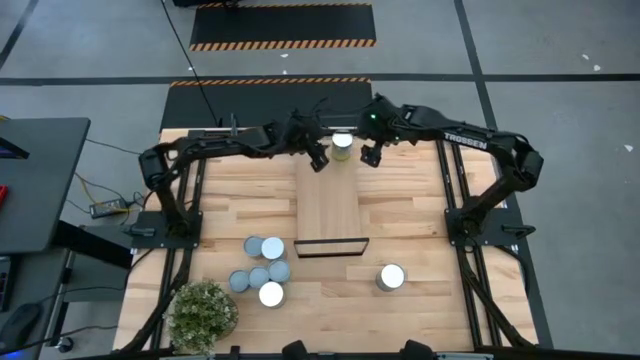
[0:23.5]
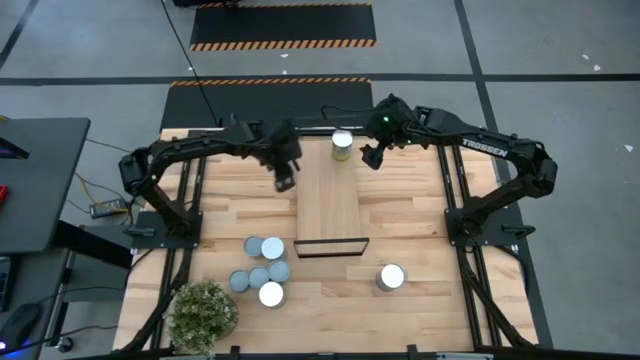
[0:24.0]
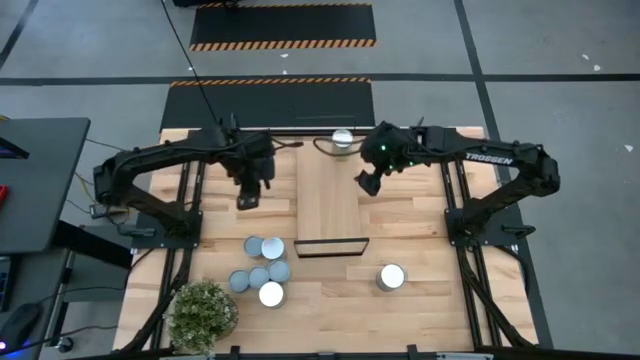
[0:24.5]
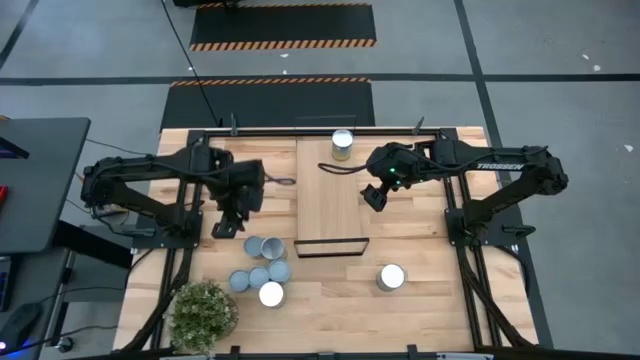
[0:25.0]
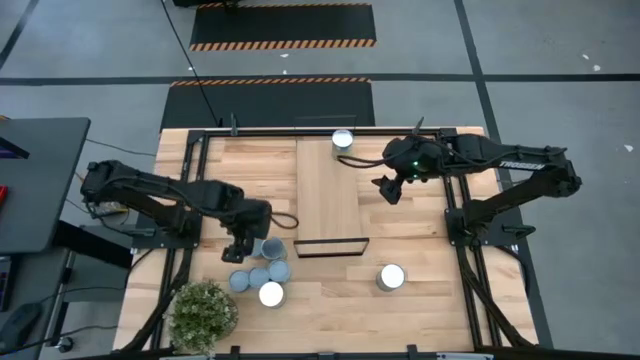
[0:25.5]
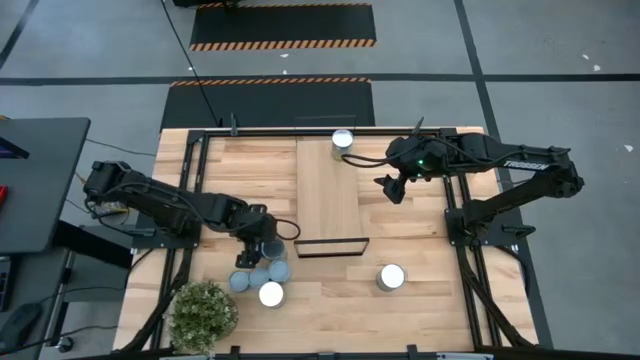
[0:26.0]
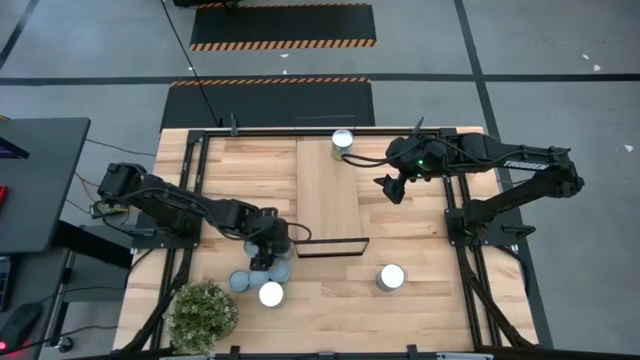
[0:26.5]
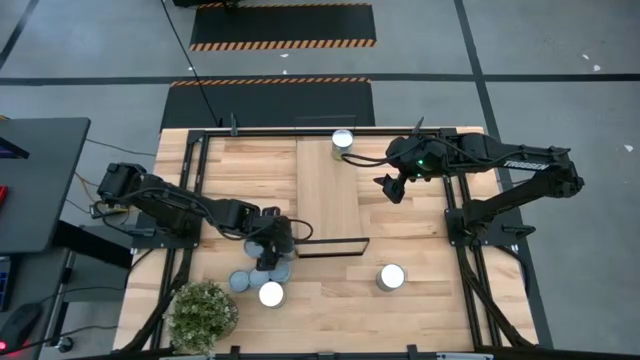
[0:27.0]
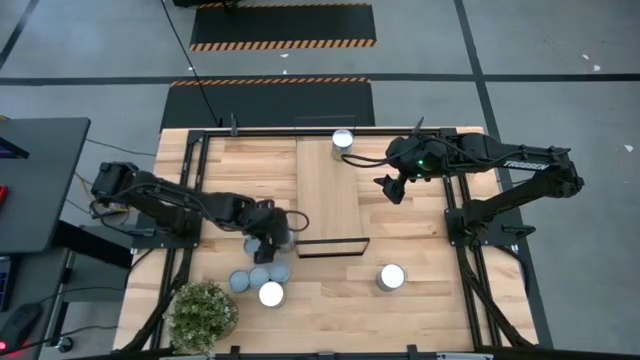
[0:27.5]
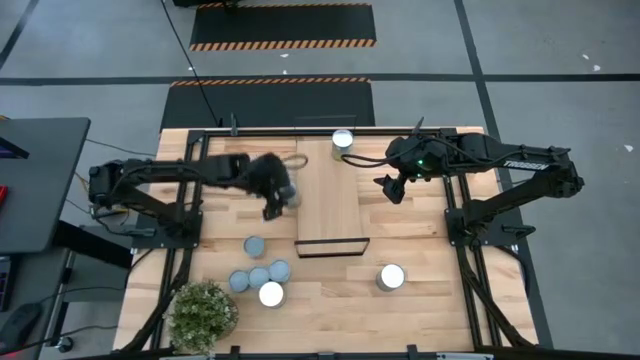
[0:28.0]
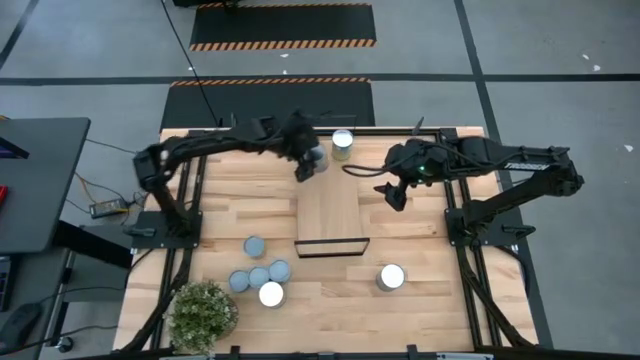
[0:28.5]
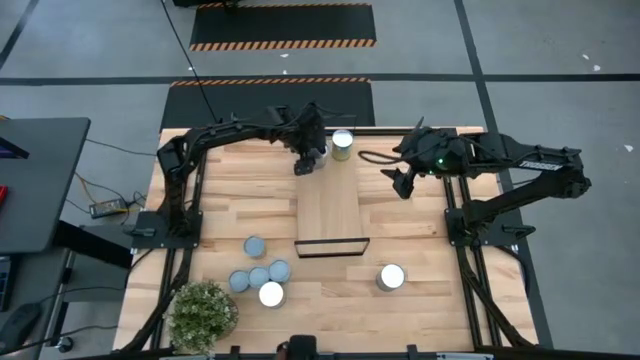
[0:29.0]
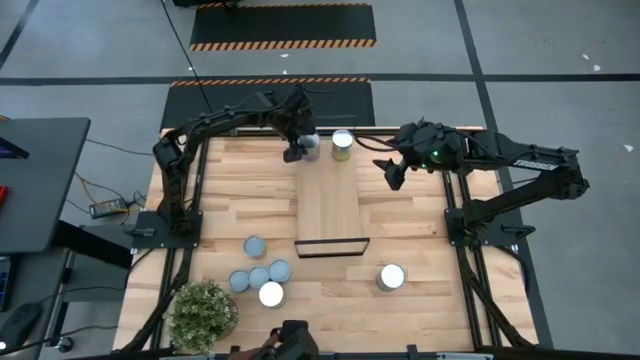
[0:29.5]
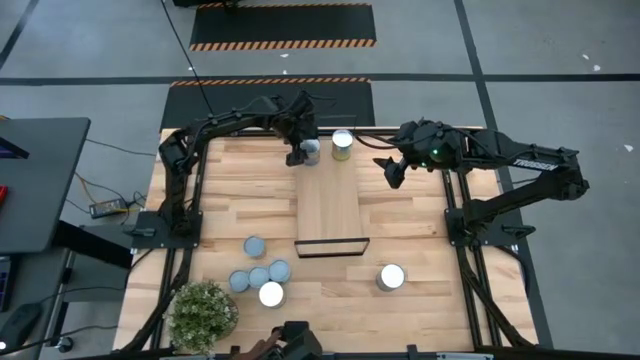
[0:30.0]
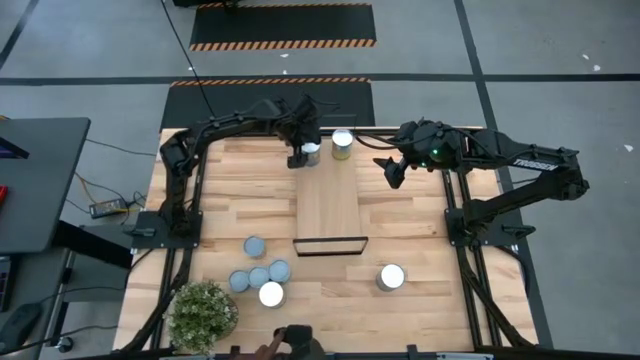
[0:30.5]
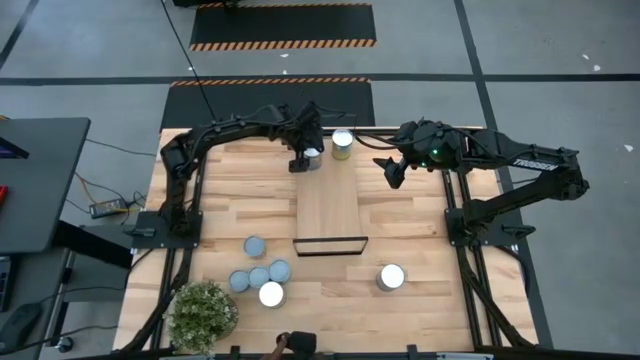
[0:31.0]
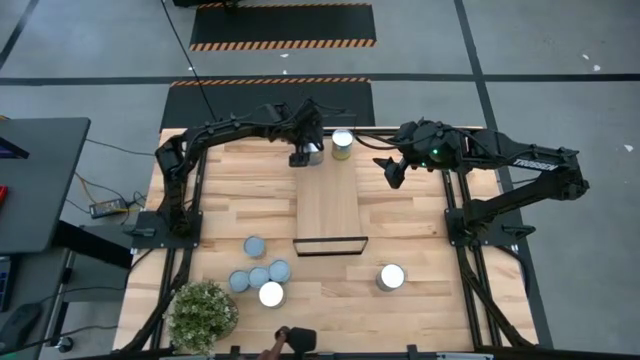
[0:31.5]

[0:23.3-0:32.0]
Task: Pick and place cans onto a shelf
Put the canned peaches on the shelf

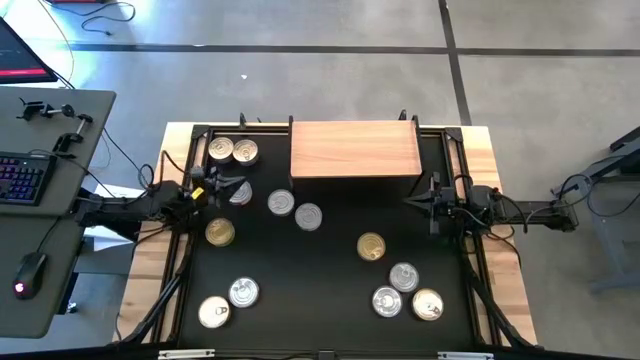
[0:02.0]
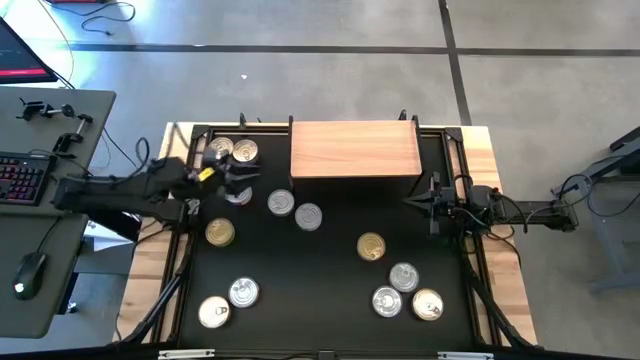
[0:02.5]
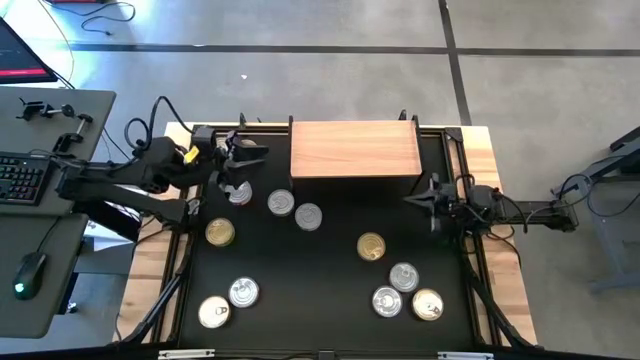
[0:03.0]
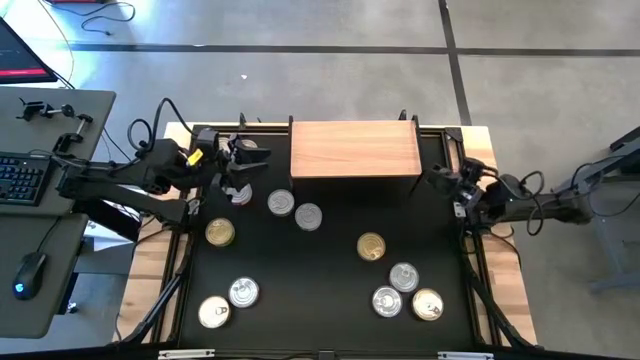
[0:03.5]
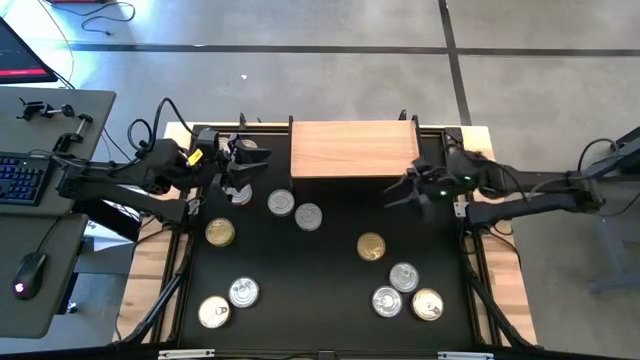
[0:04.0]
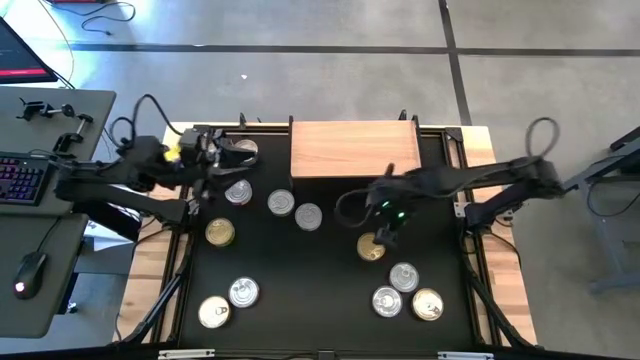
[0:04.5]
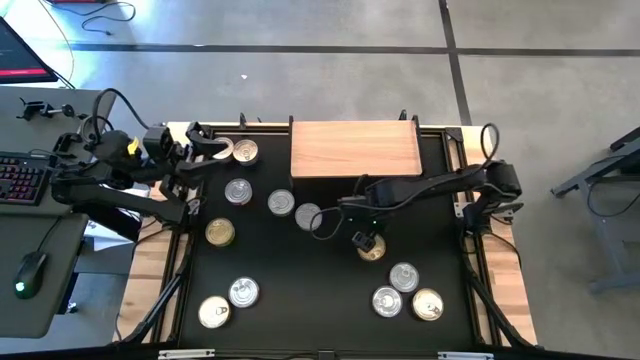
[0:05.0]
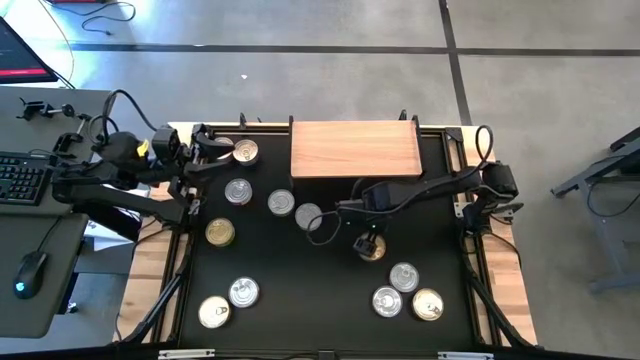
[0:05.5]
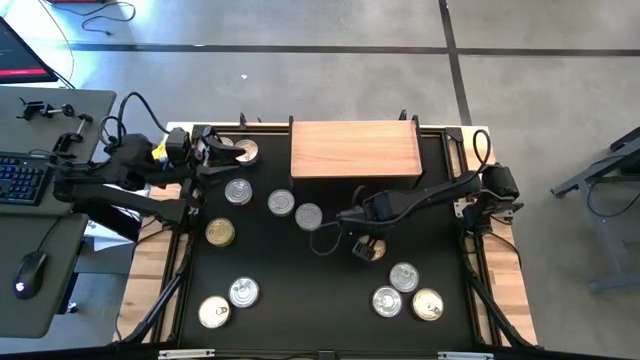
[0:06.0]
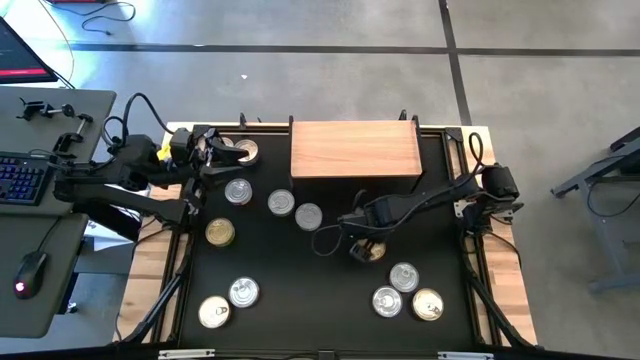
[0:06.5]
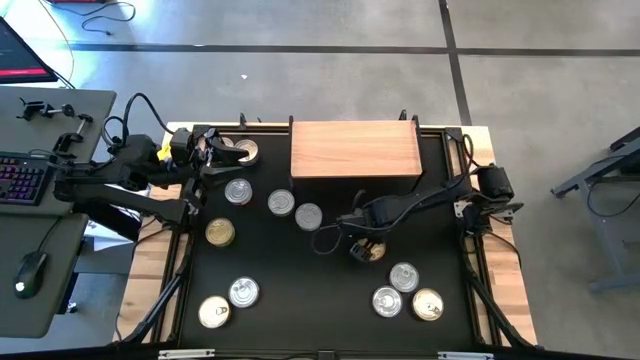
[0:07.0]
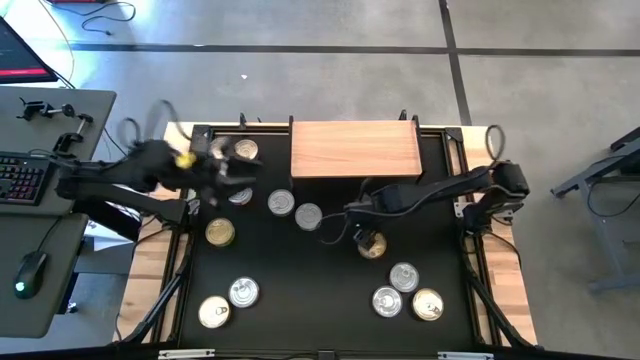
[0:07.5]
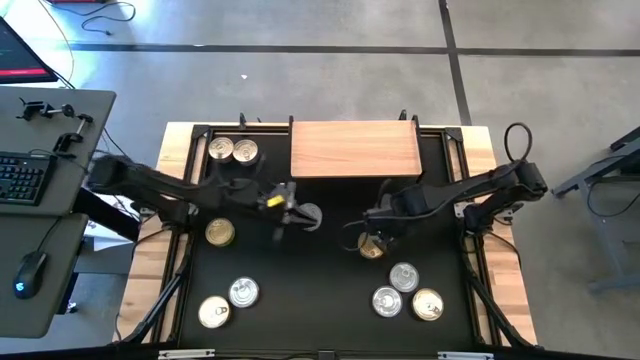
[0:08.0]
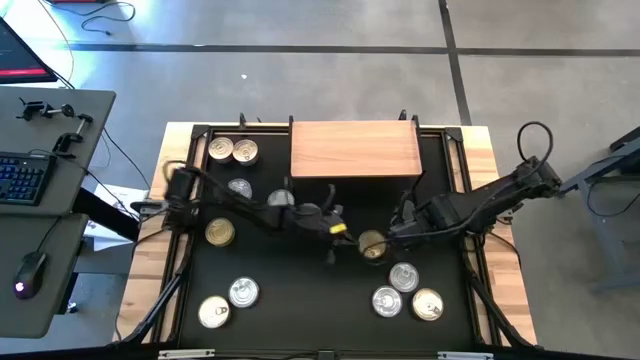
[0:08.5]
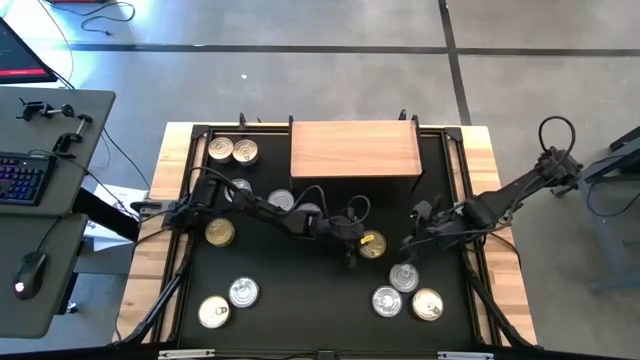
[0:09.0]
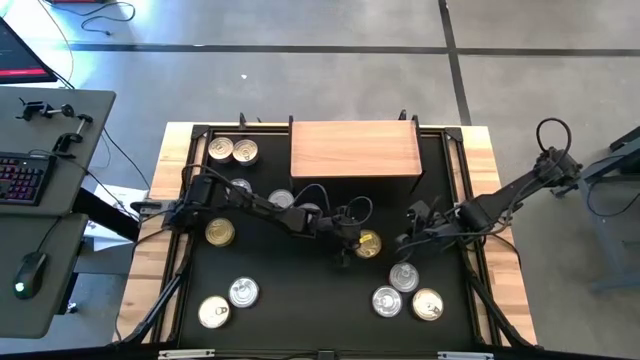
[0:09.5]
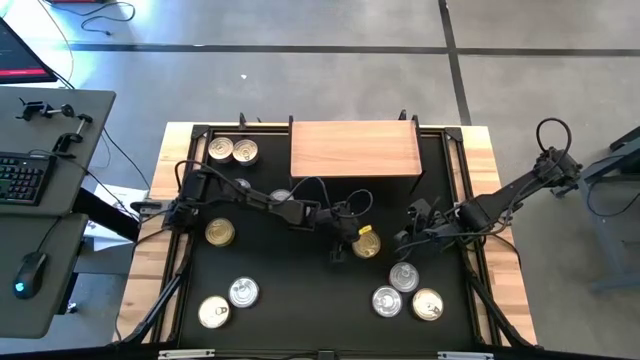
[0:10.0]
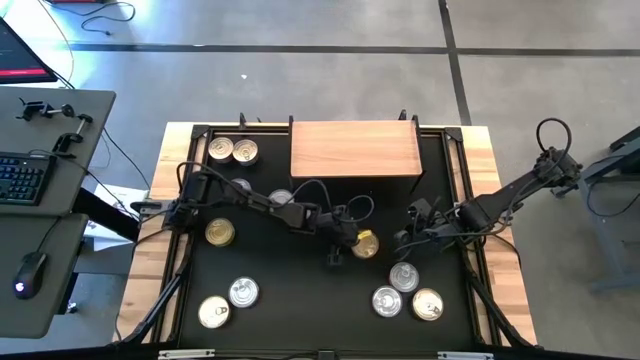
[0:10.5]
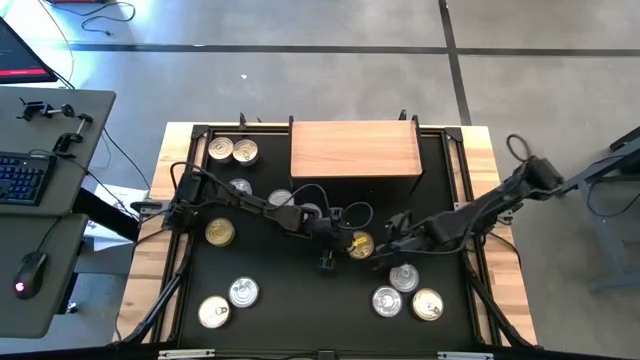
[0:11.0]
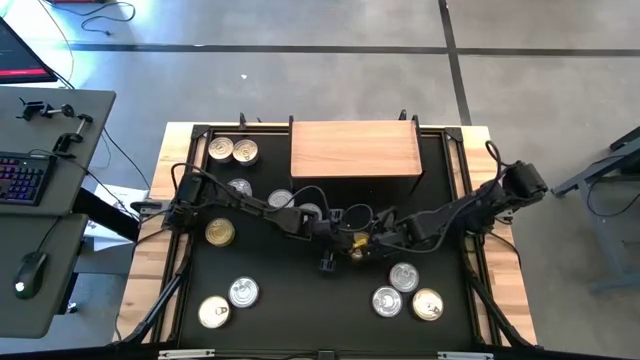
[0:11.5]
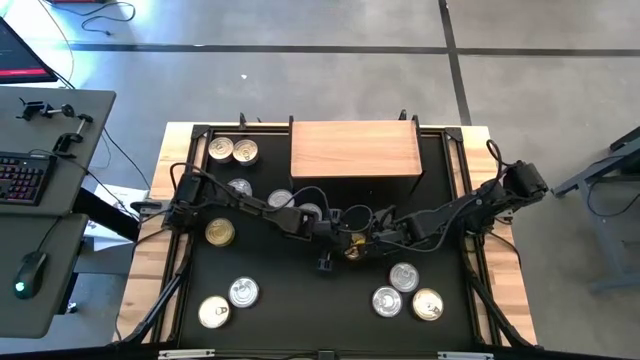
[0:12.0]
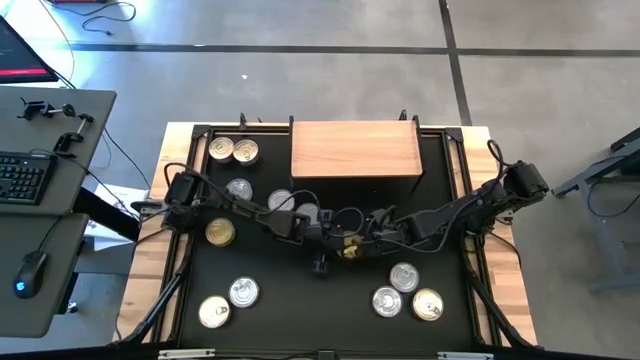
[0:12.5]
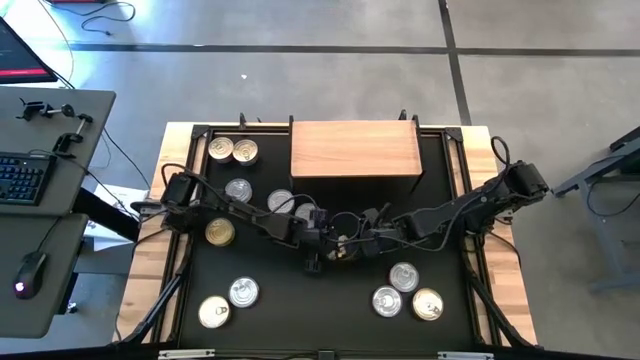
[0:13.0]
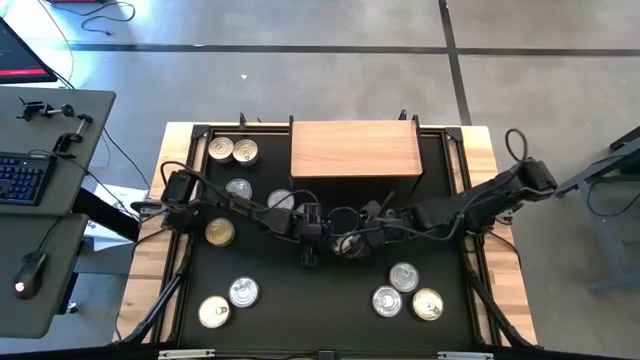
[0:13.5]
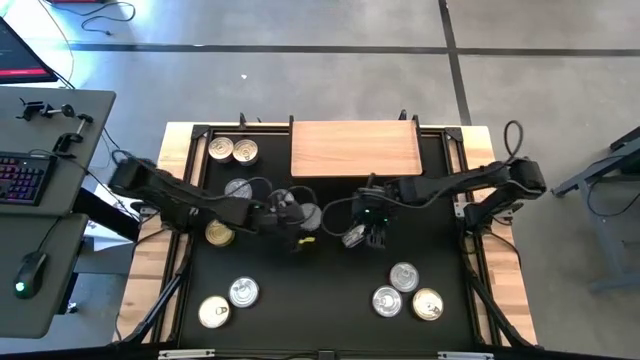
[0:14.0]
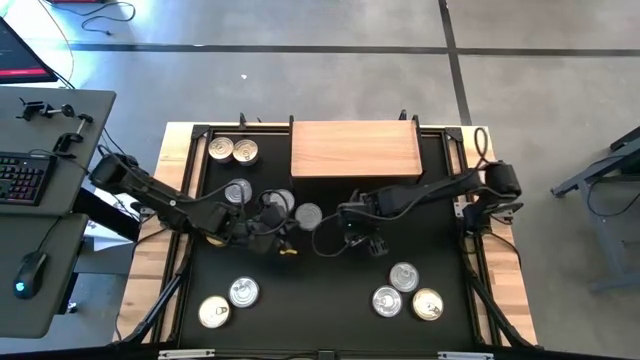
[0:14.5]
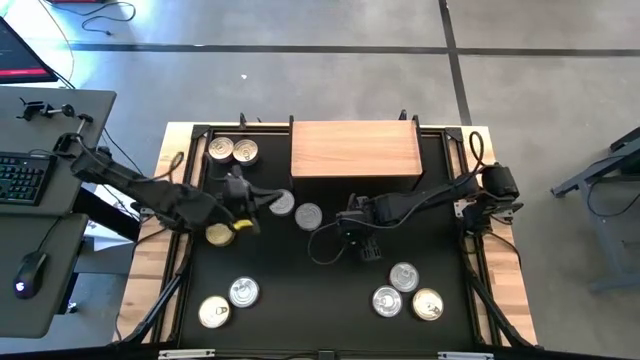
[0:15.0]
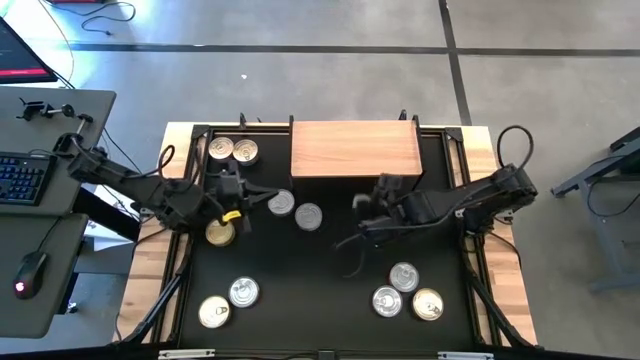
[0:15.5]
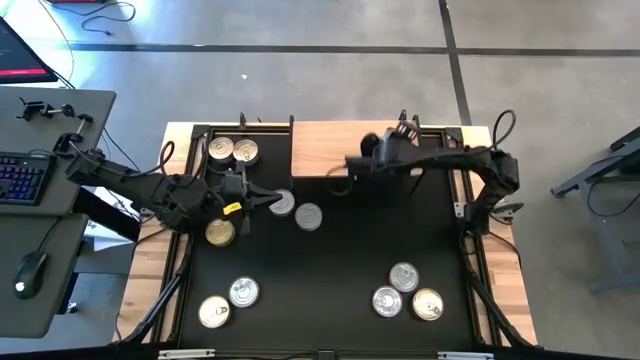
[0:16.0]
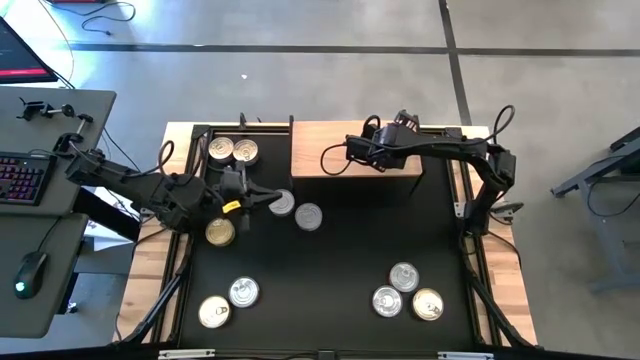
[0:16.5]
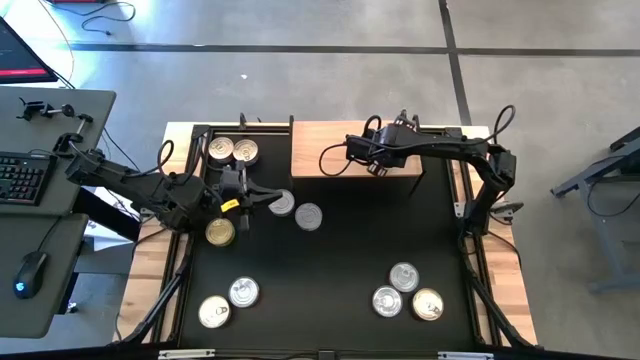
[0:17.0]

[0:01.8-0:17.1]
Task: Stack canned seafood by type on shelf
Put the green tuna can on the shelf
